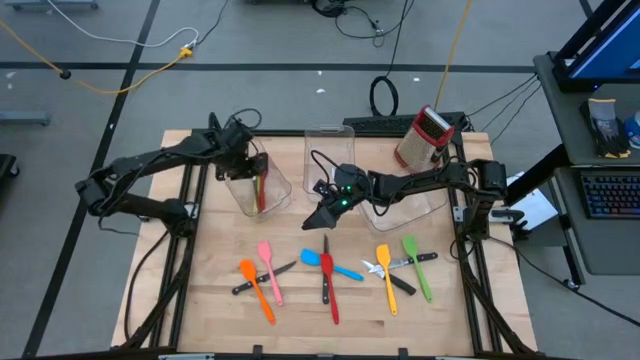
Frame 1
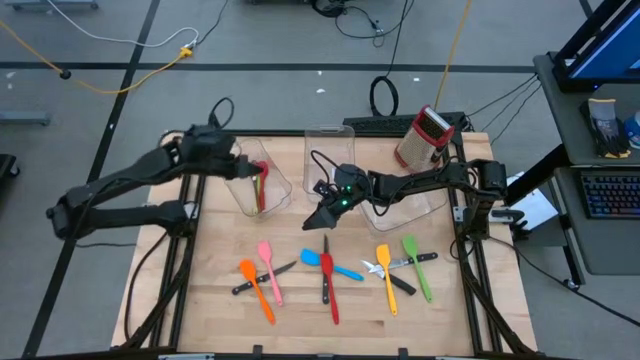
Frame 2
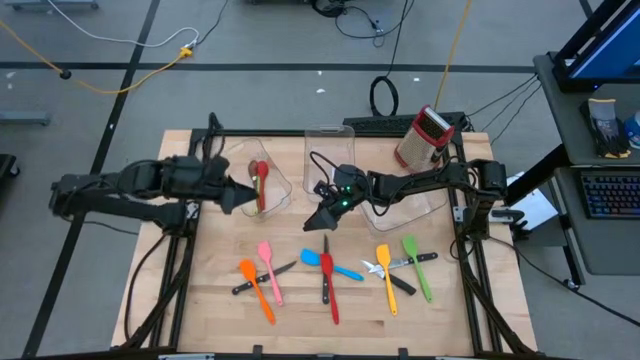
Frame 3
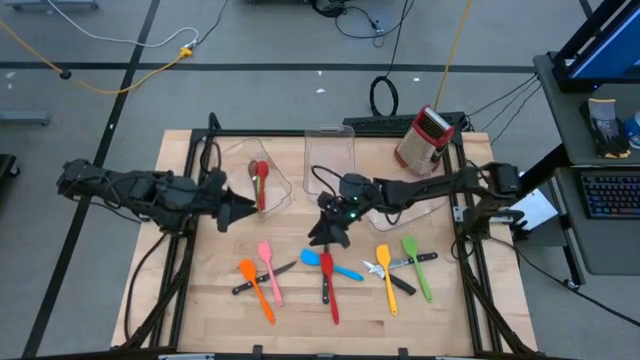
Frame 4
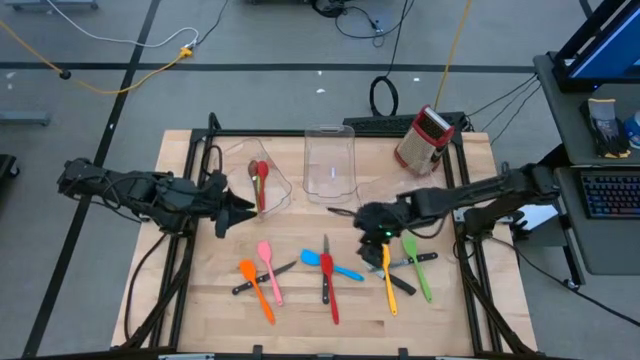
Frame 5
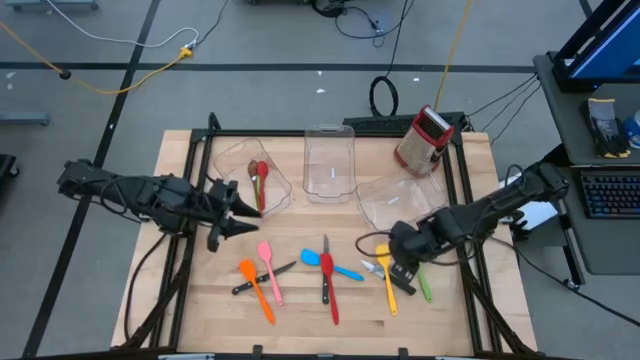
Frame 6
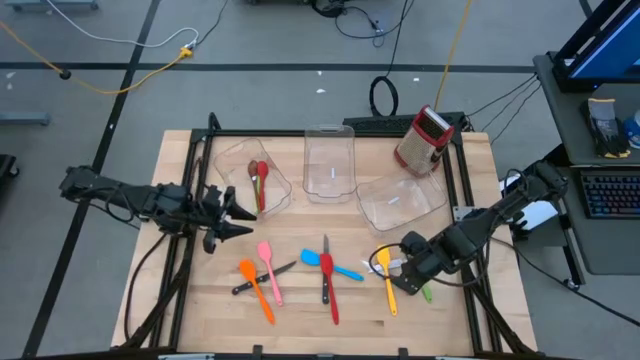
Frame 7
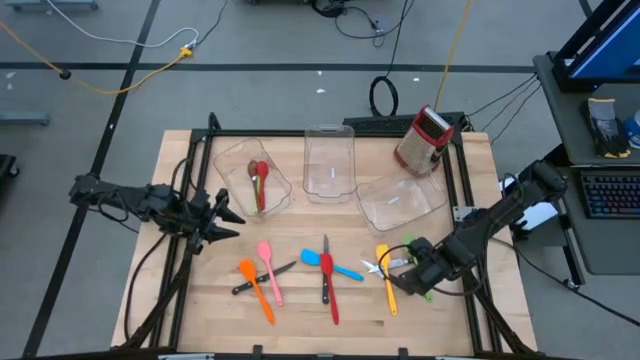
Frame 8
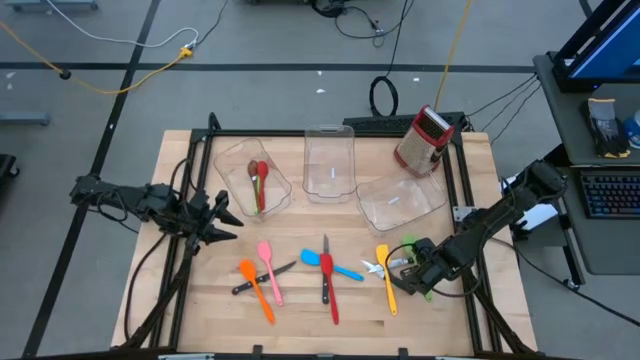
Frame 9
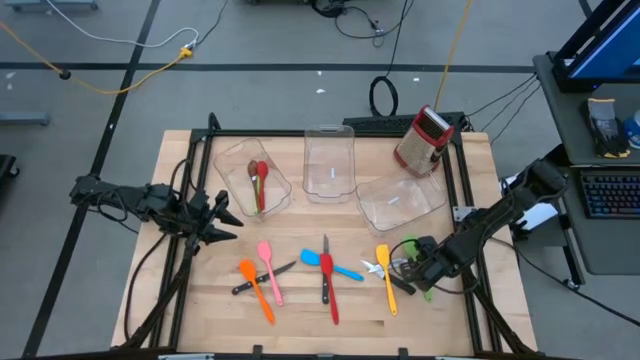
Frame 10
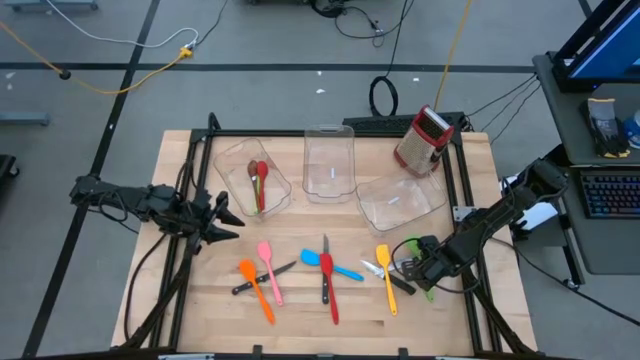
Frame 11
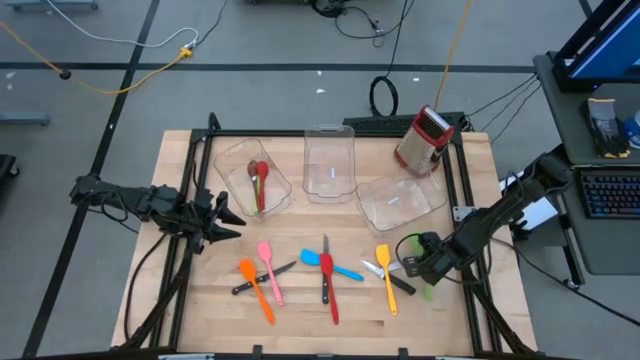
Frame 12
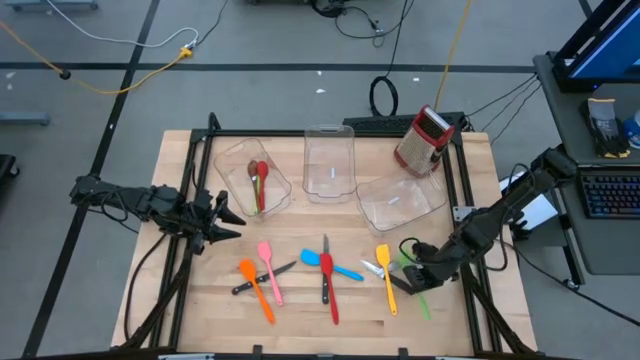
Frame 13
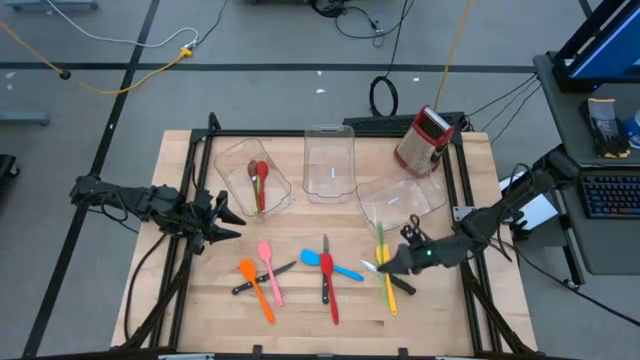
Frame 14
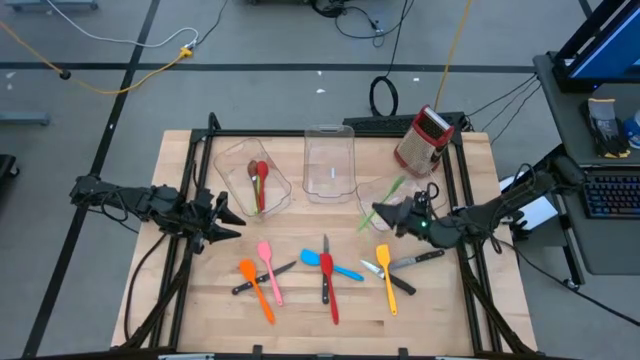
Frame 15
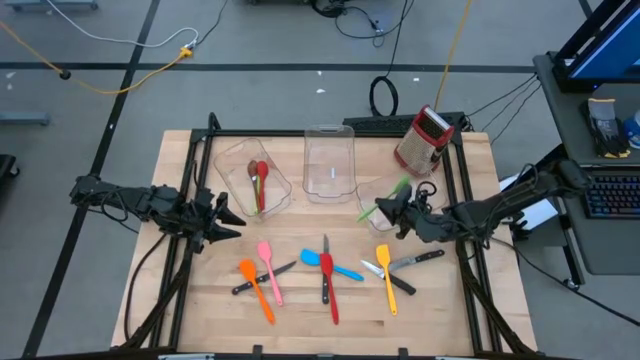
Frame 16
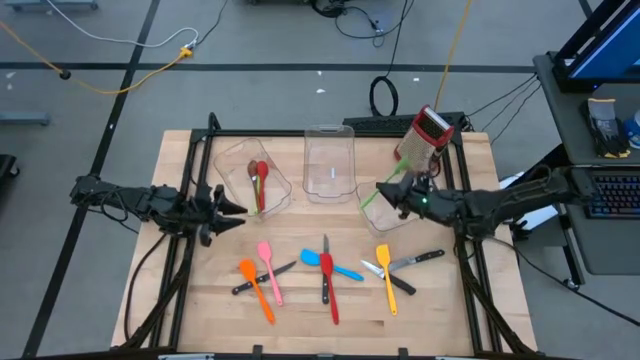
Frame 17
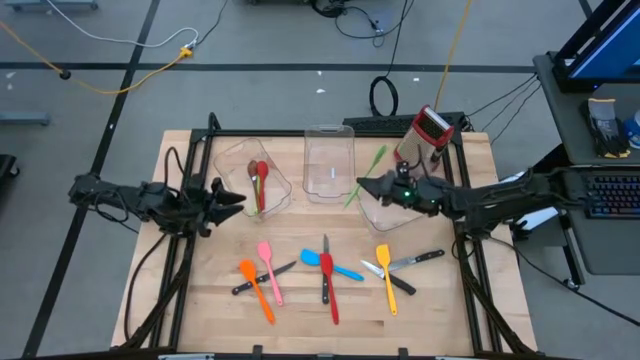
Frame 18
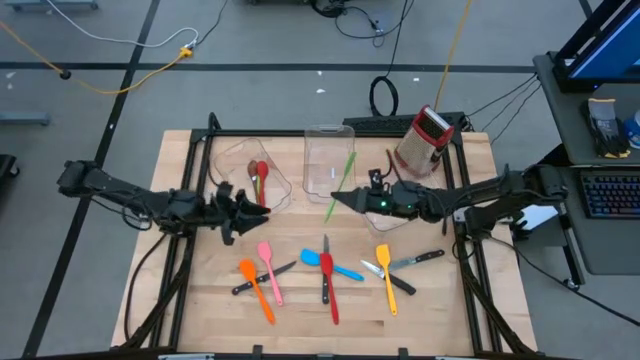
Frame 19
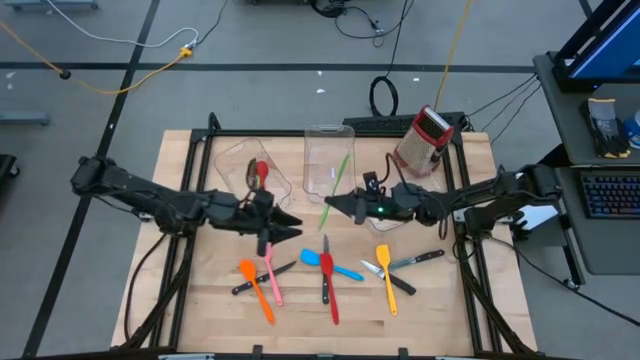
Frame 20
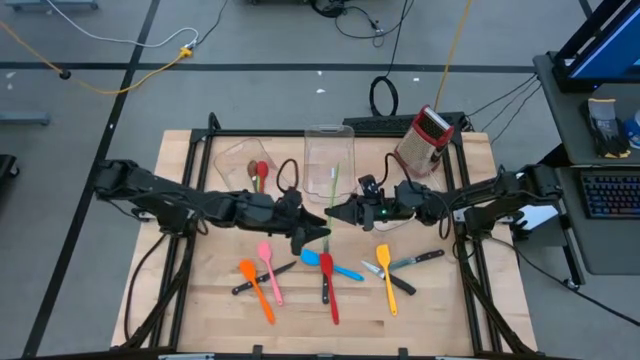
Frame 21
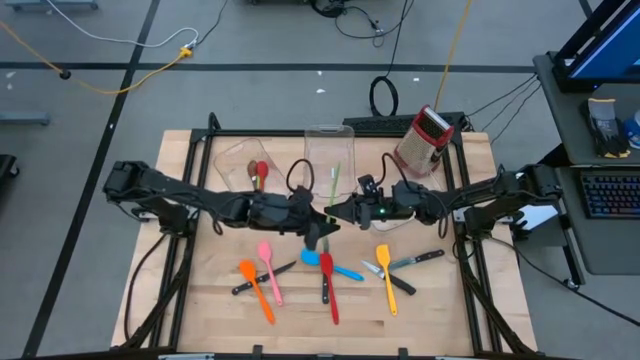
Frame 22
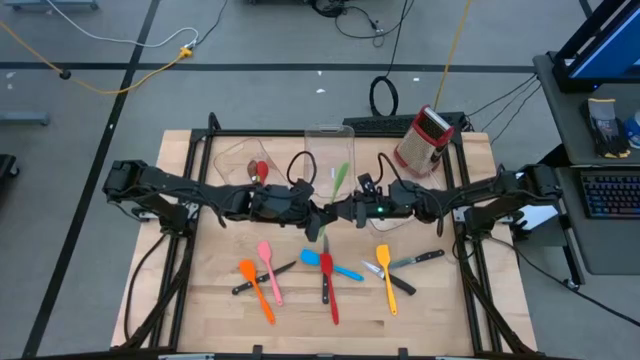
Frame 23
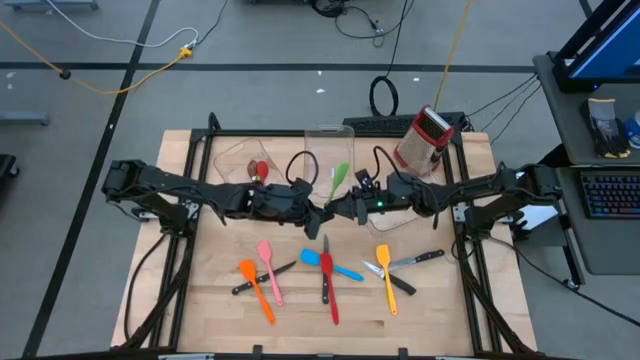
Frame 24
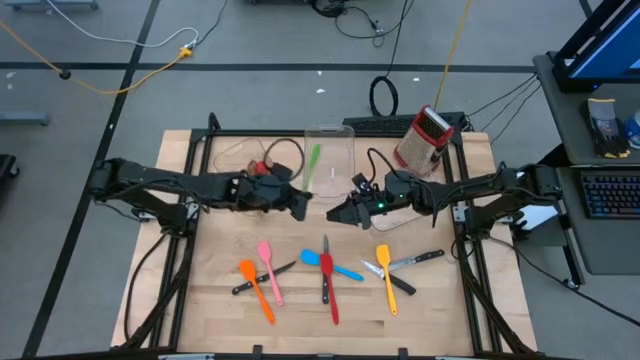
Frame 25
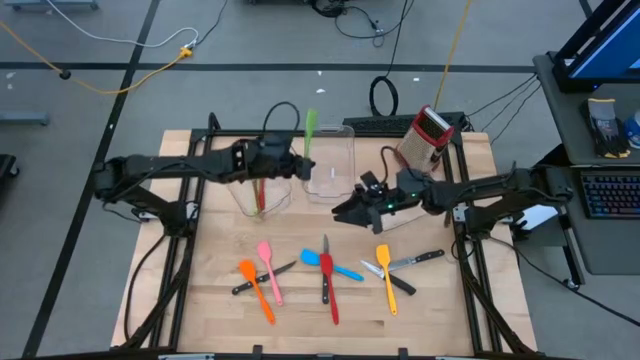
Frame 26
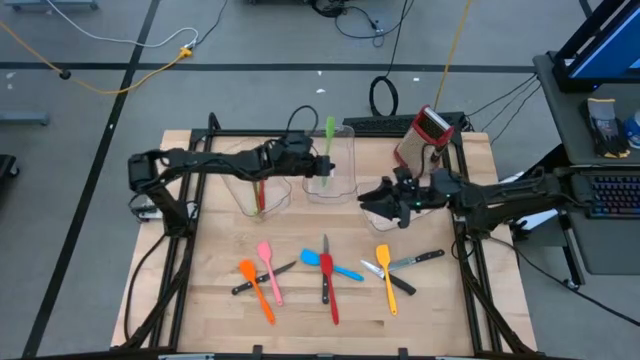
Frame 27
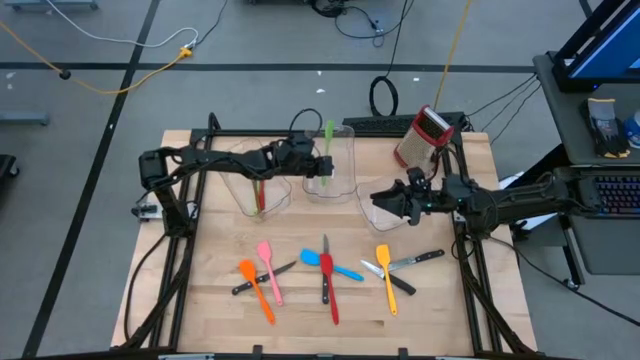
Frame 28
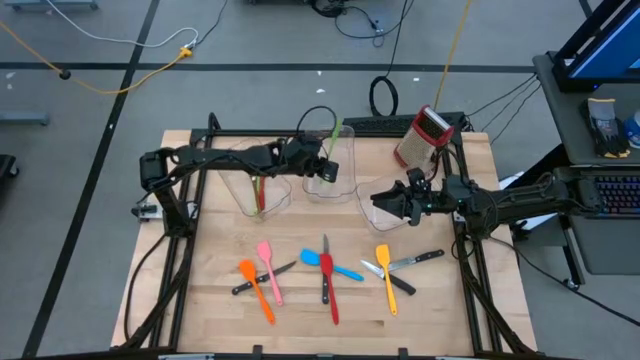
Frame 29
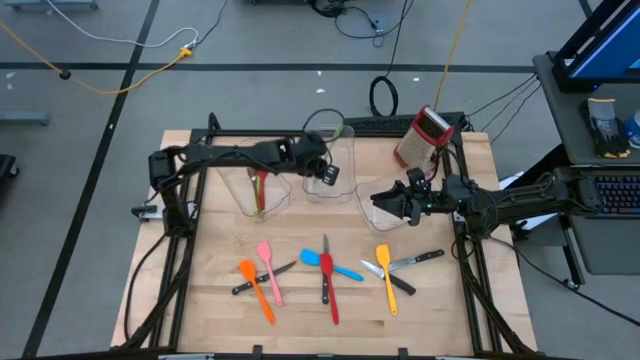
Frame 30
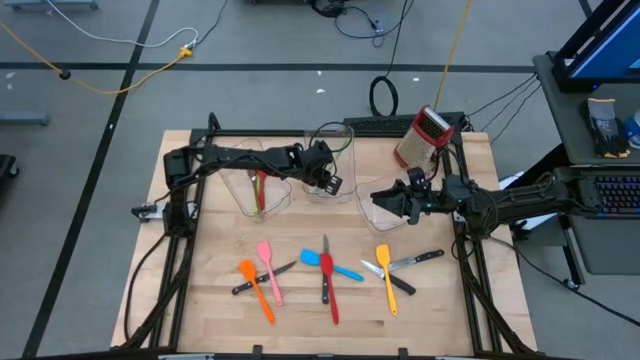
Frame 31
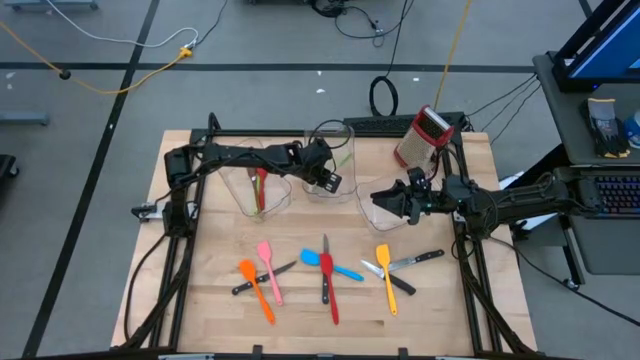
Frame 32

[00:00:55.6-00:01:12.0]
Task: Pick & Place Kitchen Items
Put the green spatula into the middle bin

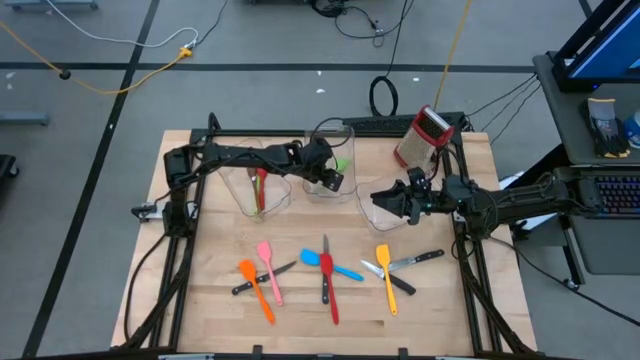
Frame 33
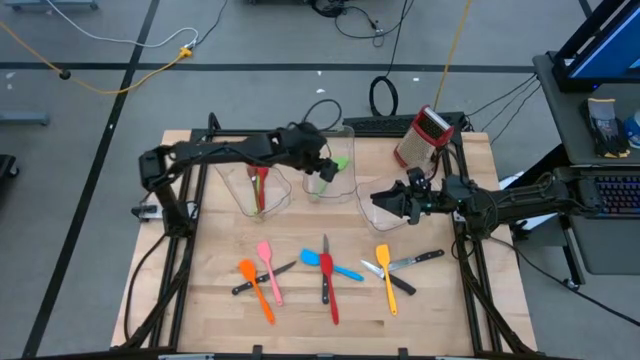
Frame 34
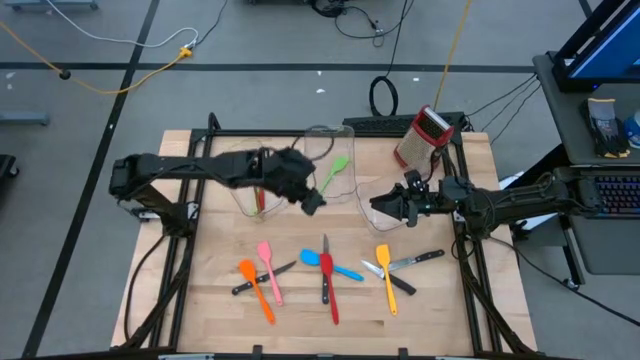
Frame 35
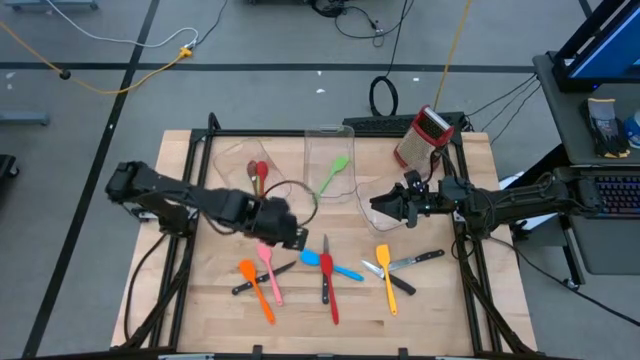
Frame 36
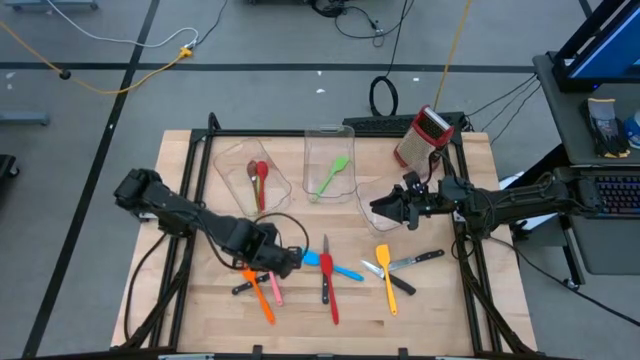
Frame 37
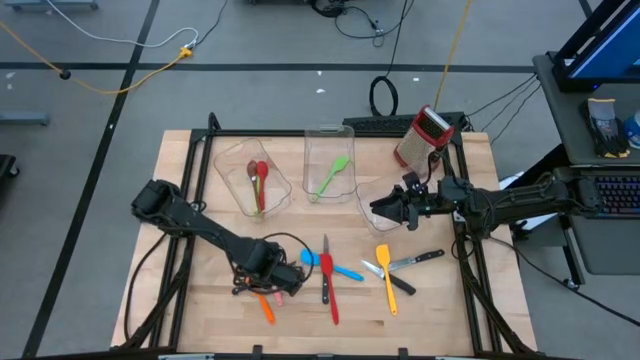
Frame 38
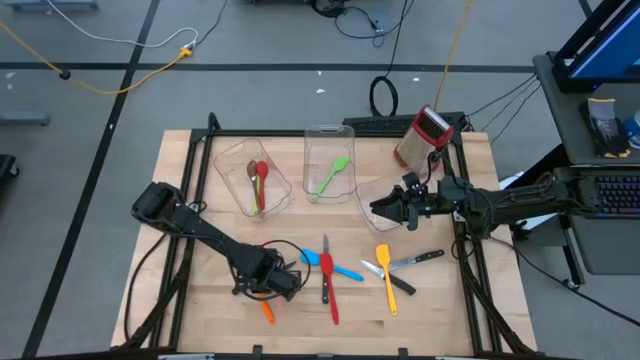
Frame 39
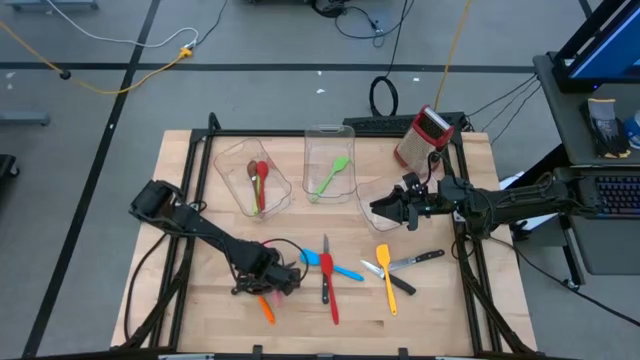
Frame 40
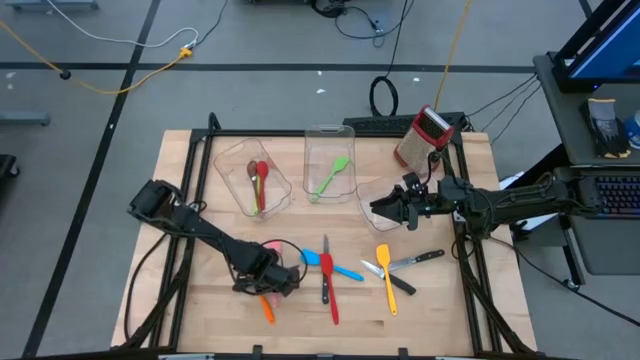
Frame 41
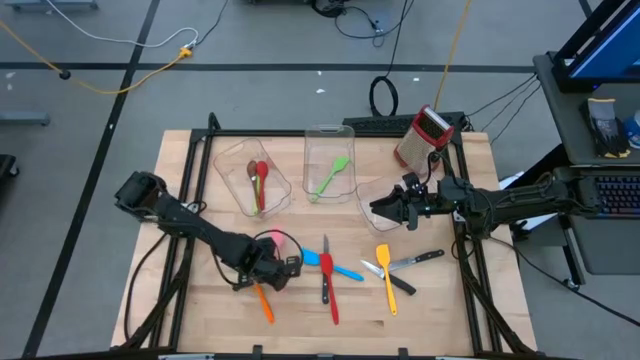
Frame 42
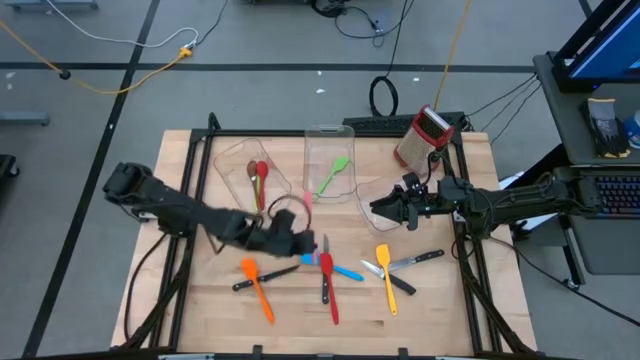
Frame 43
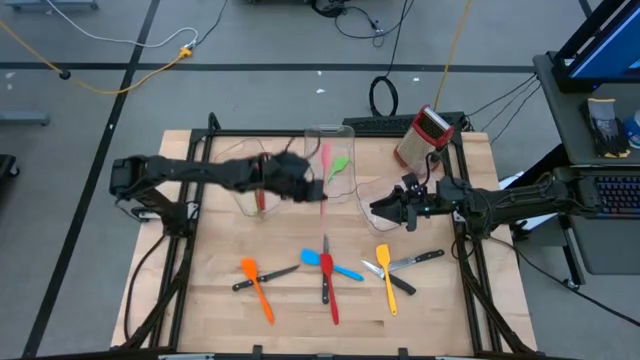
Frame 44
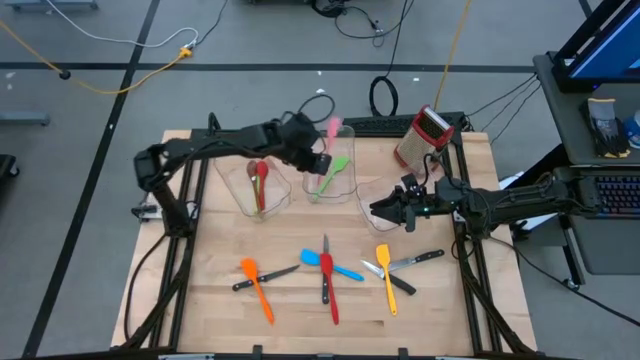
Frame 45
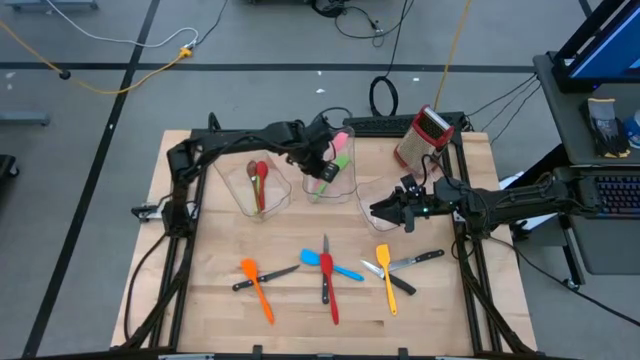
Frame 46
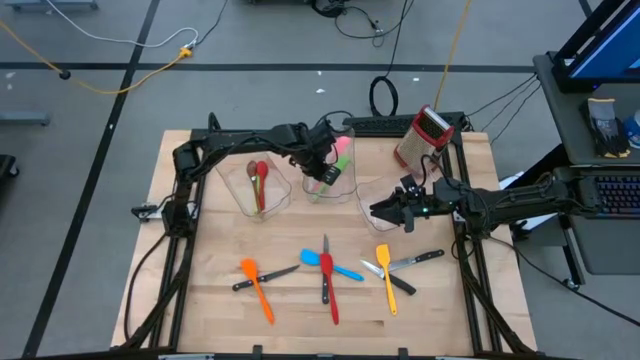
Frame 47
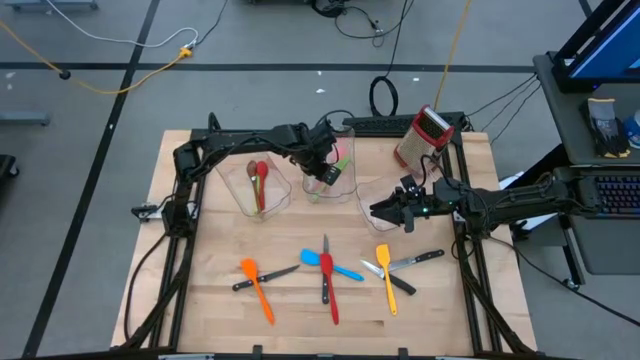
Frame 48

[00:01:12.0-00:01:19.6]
Put the pink silicone spatula into the middle bin
